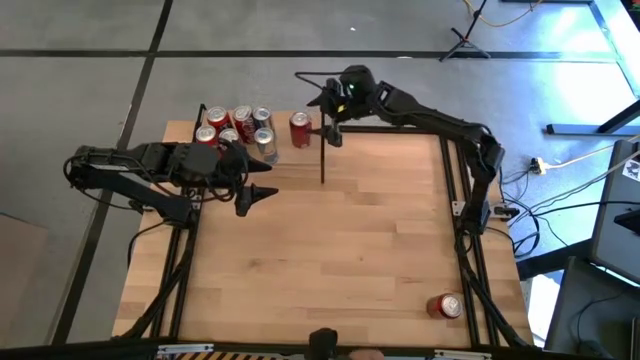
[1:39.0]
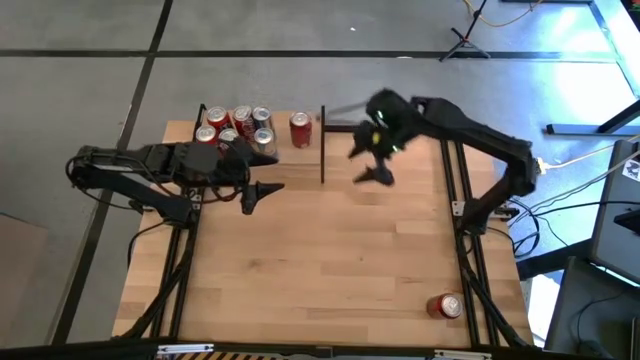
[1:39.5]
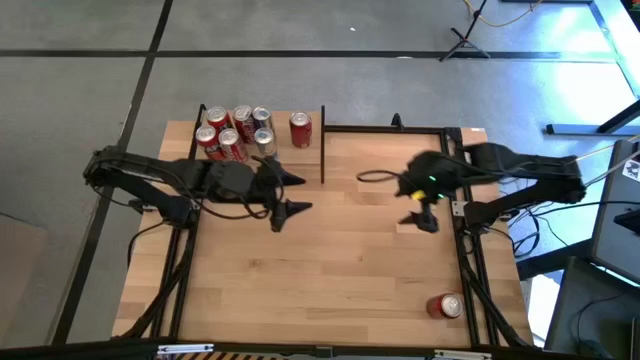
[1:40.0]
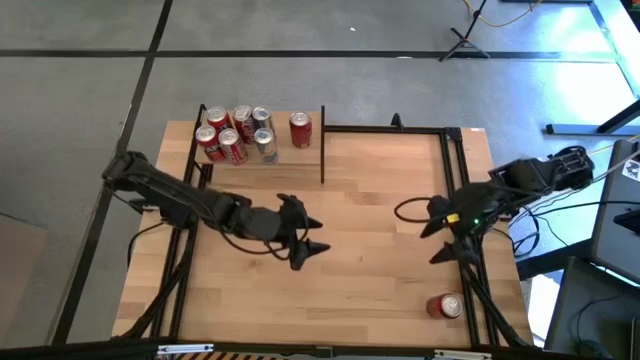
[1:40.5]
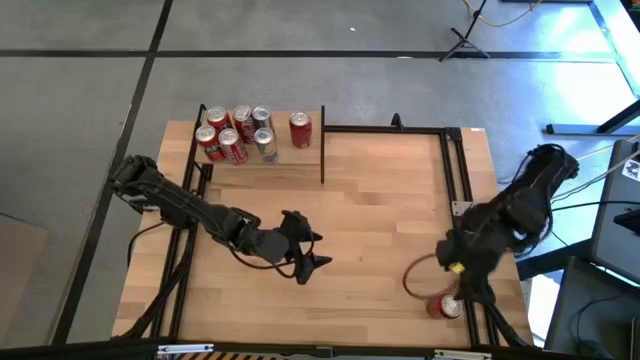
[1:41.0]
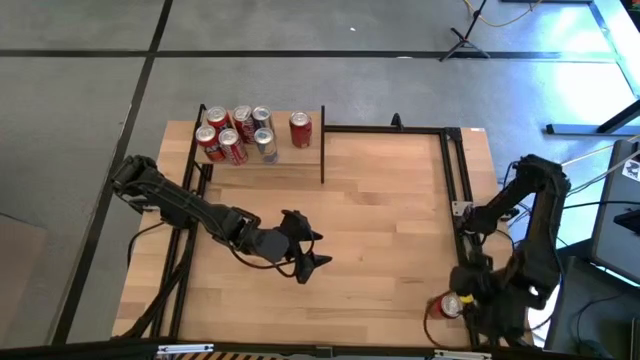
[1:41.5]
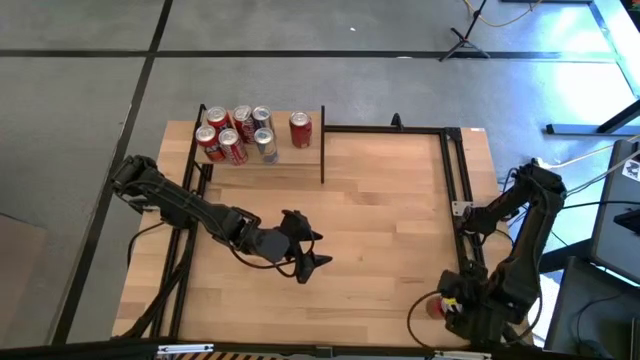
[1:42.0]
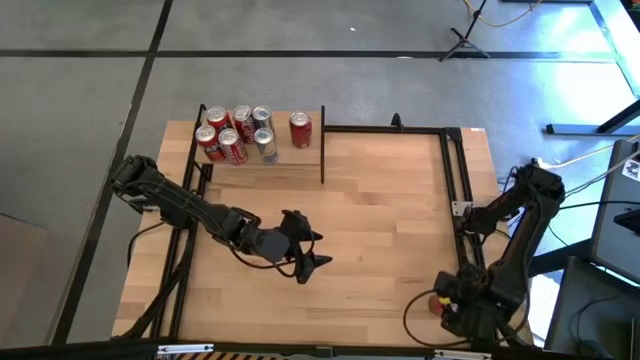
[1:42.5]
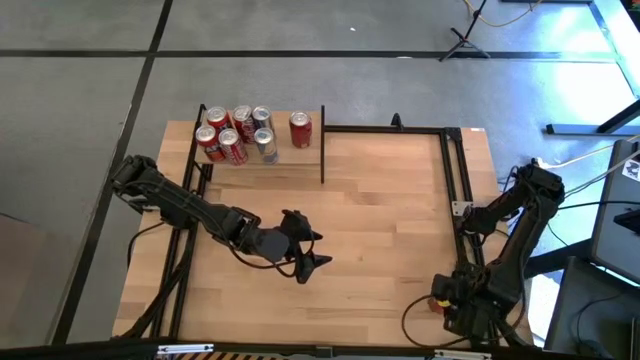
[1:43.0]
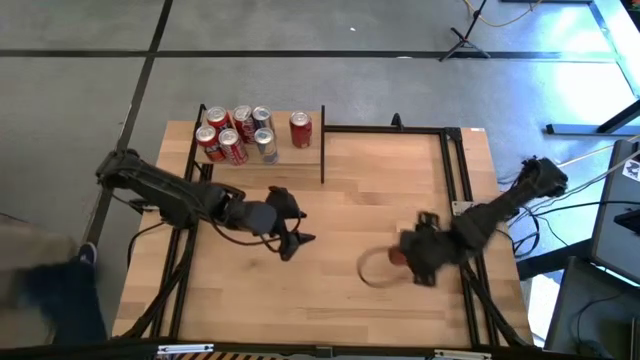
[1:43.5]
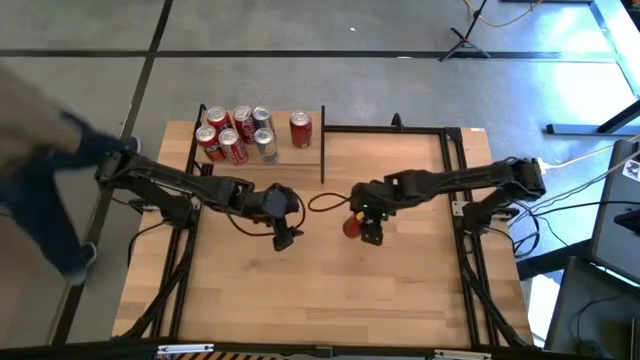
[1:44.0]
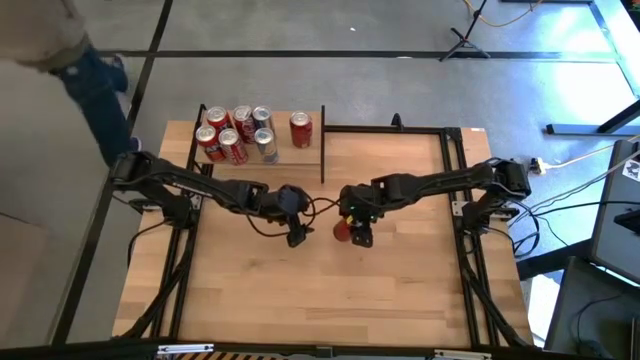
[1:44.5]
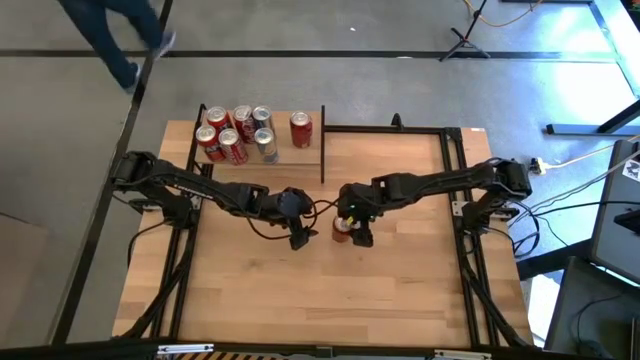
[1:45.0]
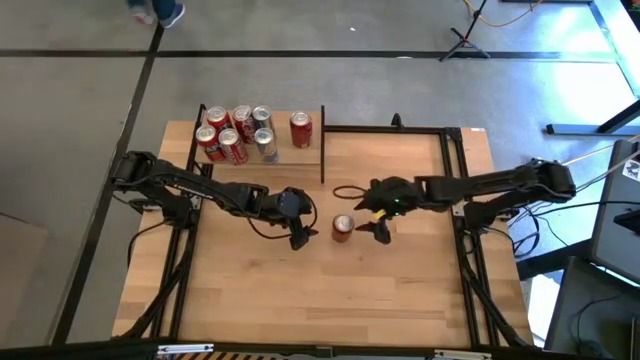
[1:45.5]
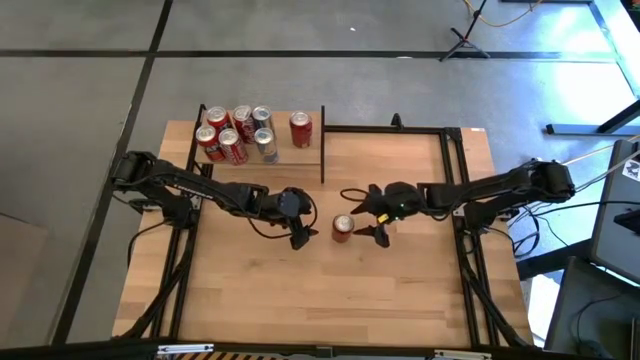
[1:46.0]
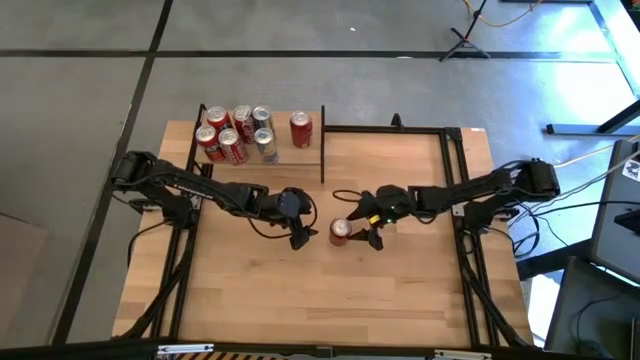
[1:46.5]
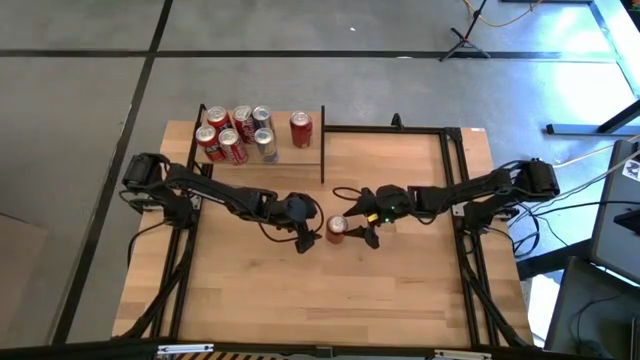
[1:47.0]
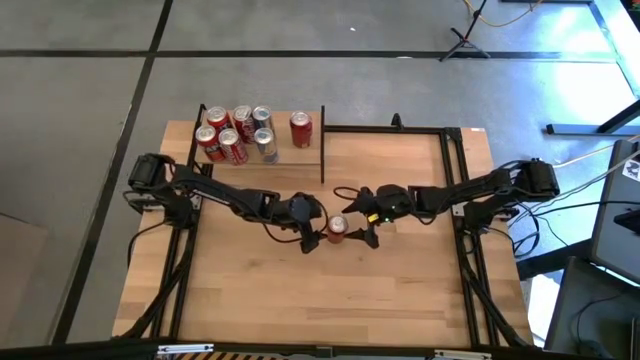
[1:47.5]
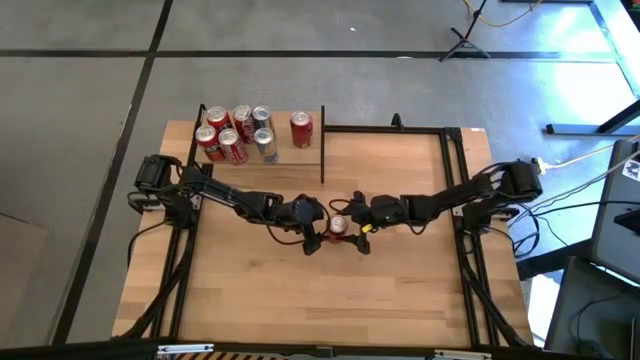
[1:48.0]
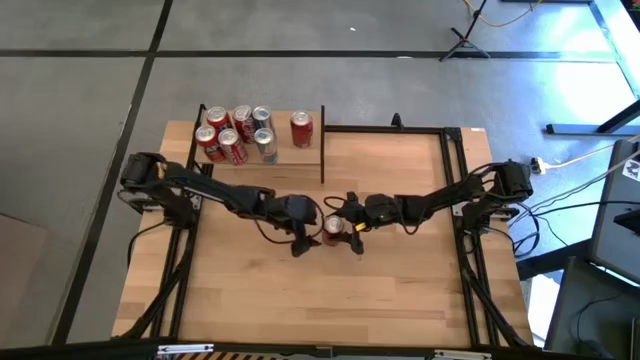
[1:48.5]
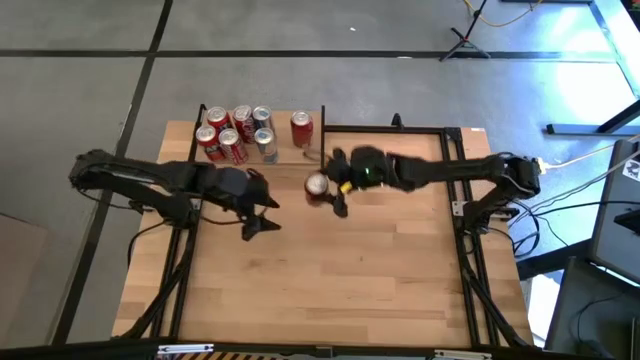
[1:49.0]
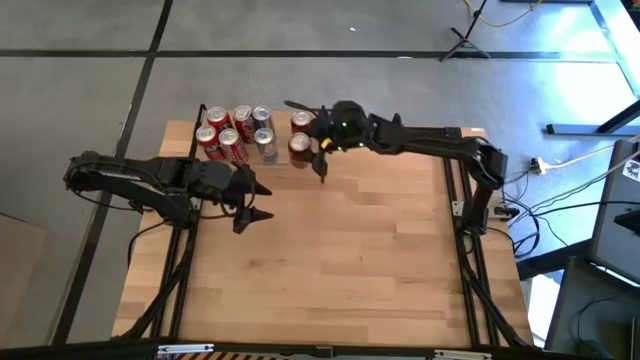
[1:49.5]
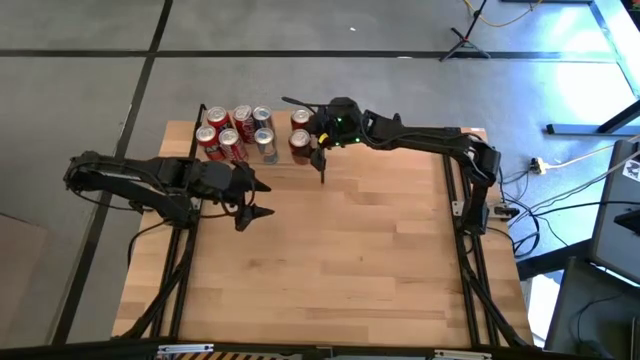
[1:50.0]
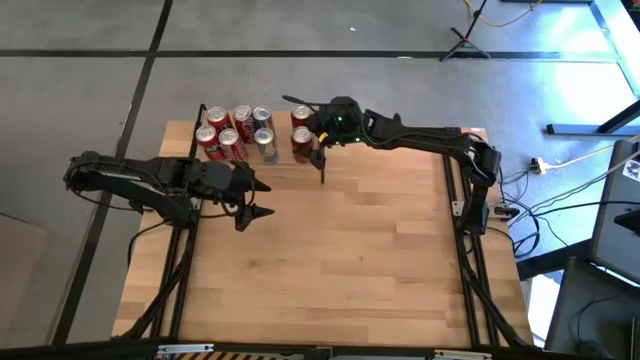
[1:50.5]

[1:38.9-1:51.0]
Task: Place canned beverage on shelf
Put the red-black soda can on the shelf aligned with the other red-black soda can

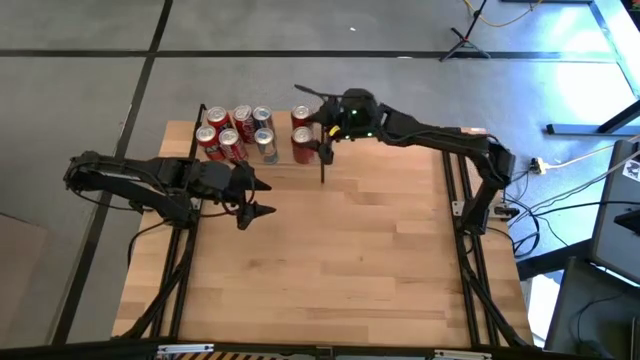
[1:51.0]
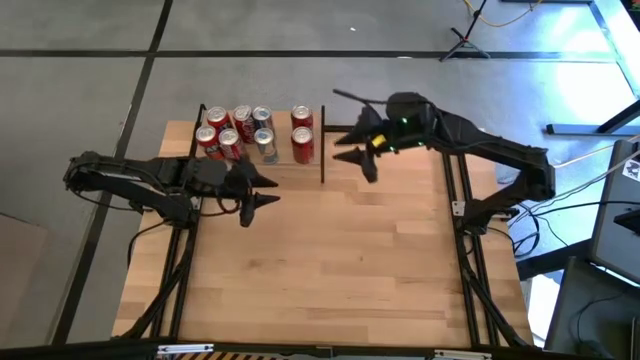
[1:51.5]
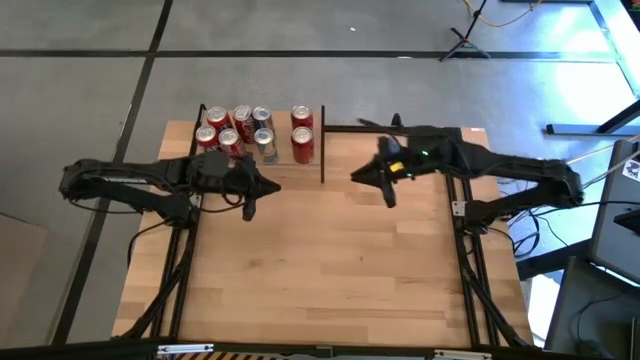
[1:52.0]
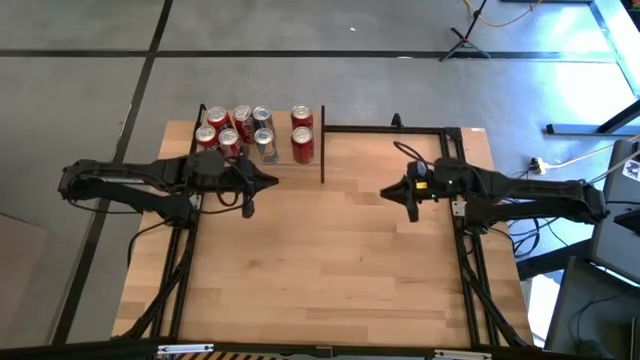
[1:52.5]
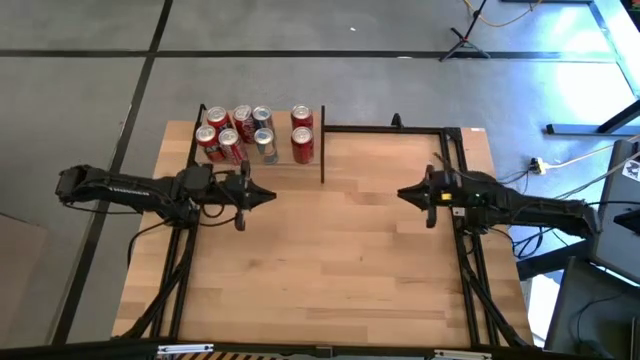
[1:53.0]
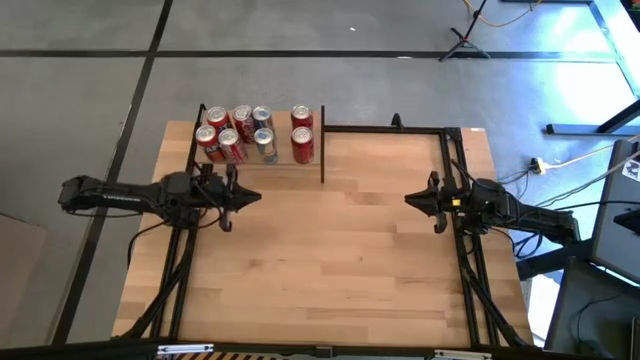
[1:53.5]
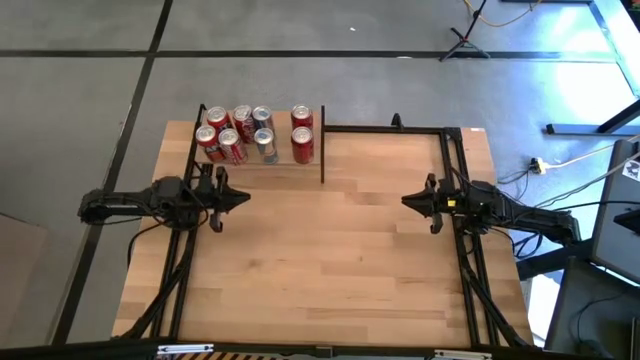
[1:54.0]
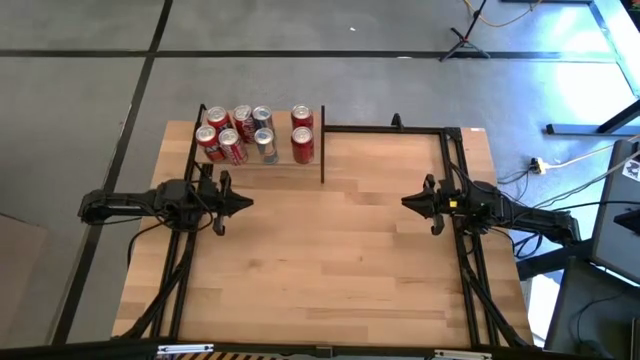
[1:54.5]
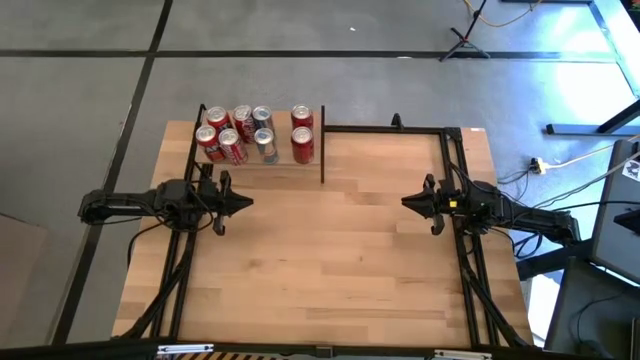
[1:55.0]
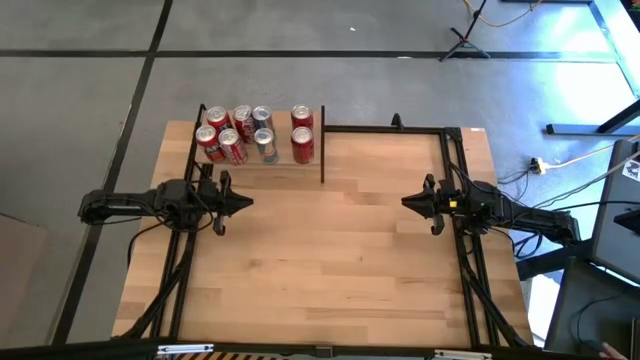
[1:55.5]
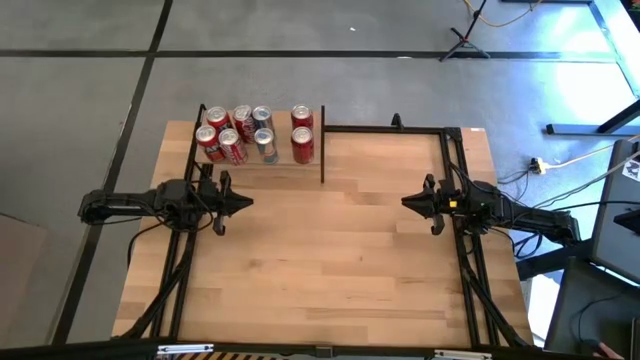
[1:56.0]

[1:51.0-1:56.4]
Return to Home Position

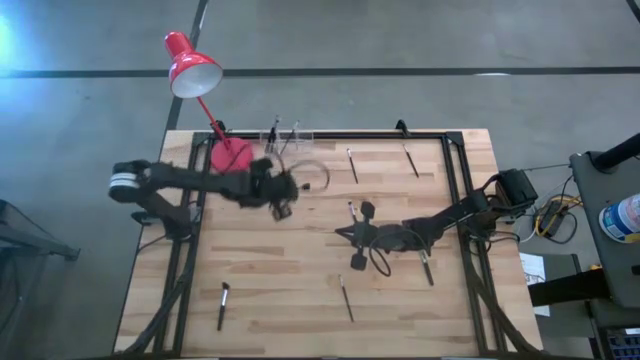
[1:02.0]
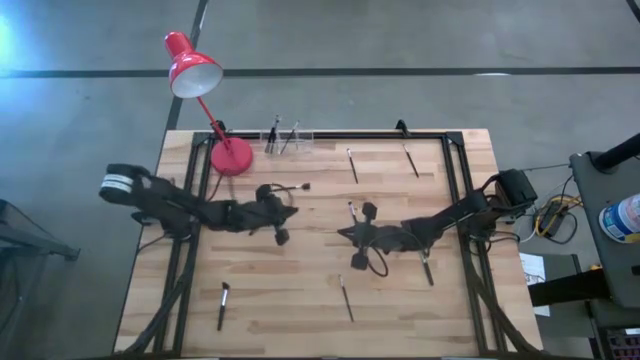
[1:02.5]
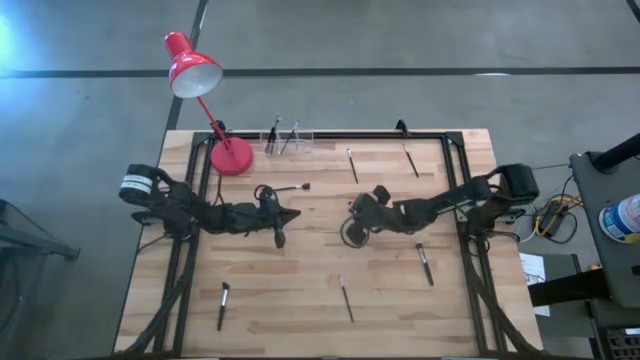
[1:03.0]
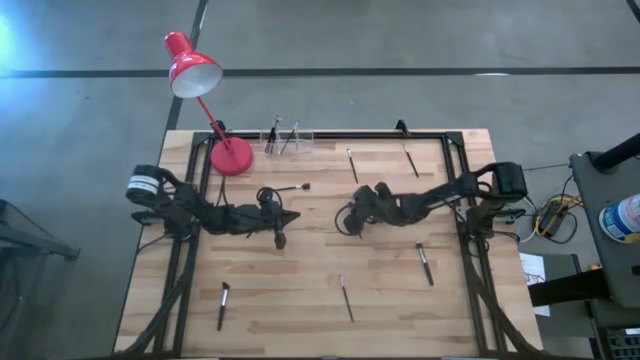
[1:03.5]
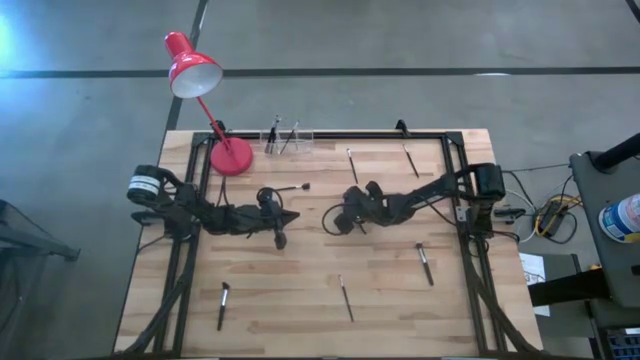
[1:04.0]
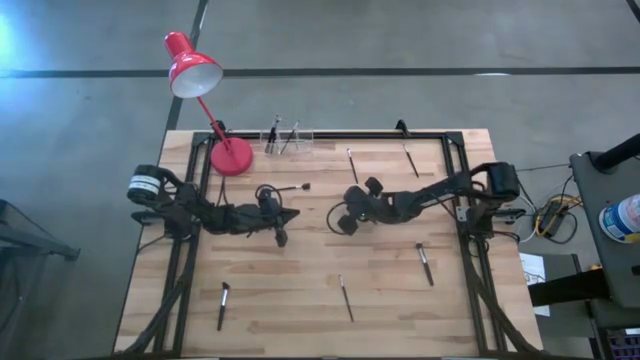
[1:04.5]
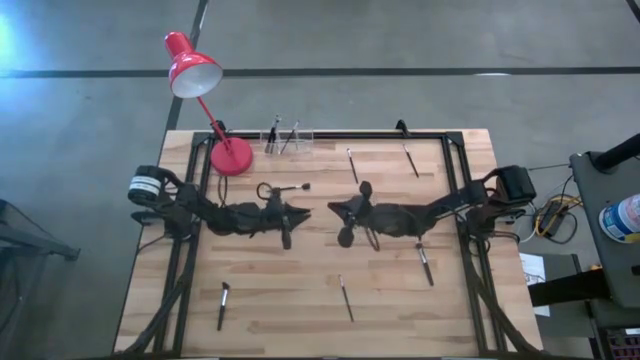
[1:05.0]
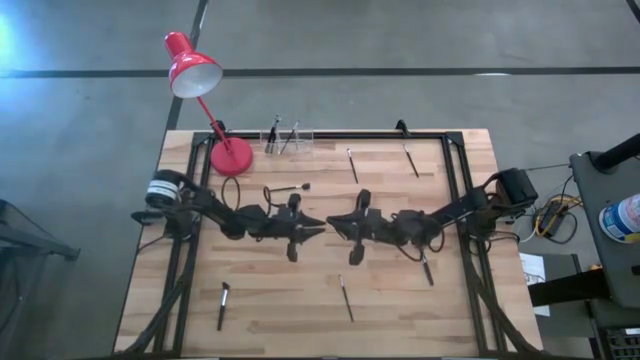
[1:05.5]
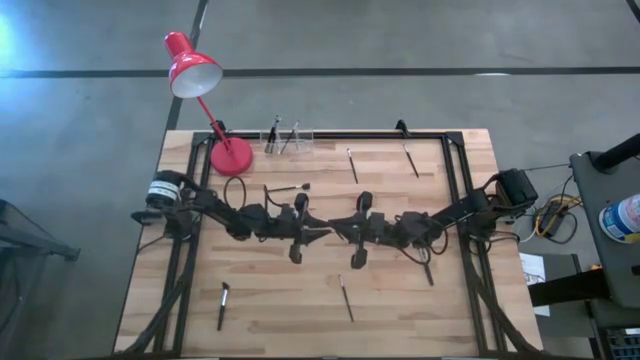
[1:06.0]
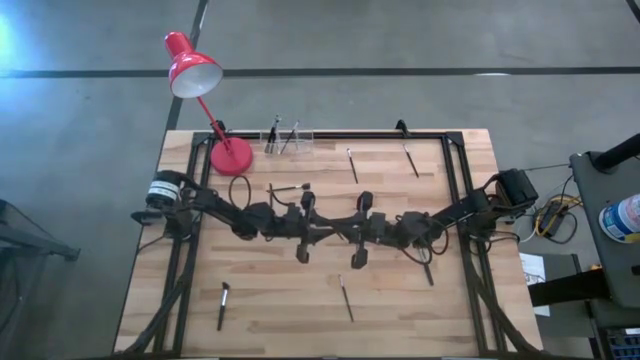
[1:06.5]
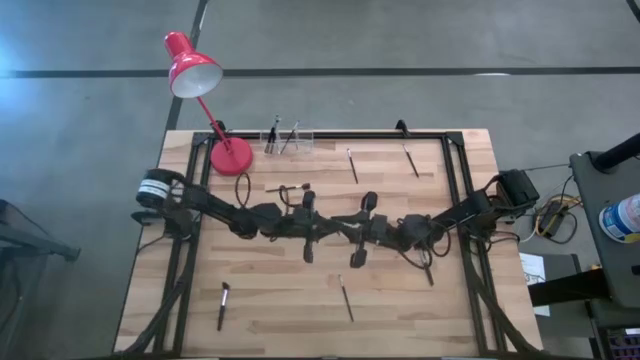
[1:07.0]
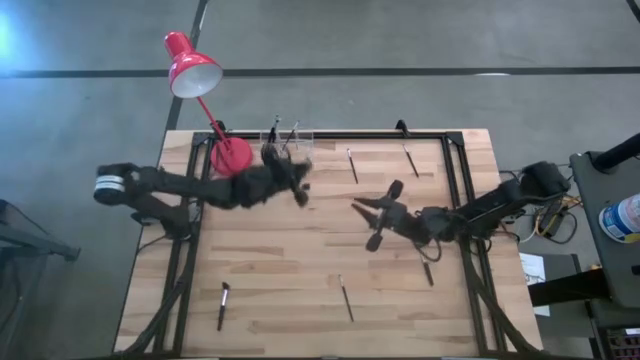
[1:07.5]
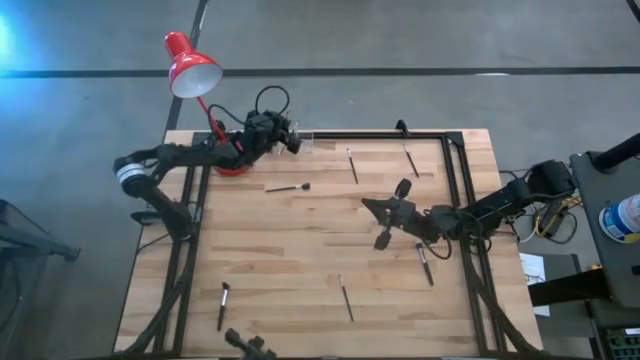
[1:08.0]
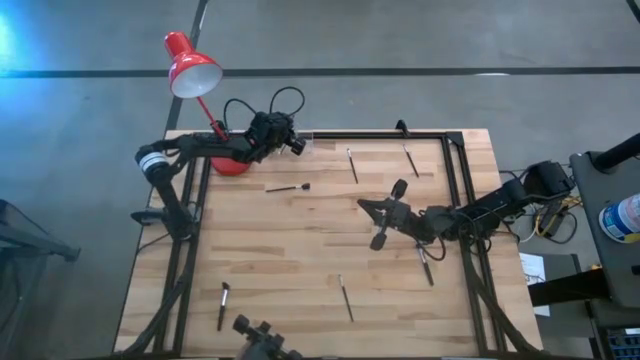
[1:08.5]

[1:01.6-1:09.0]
Task: Pick & Place Makeup Supplies
Put the makeup brush into the transparent organizer
